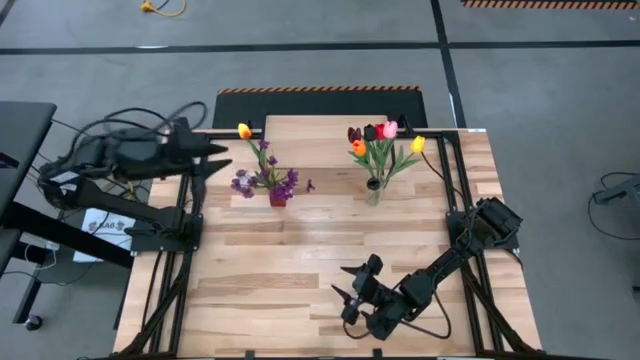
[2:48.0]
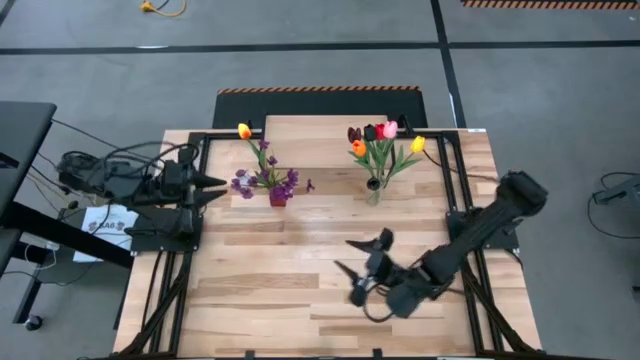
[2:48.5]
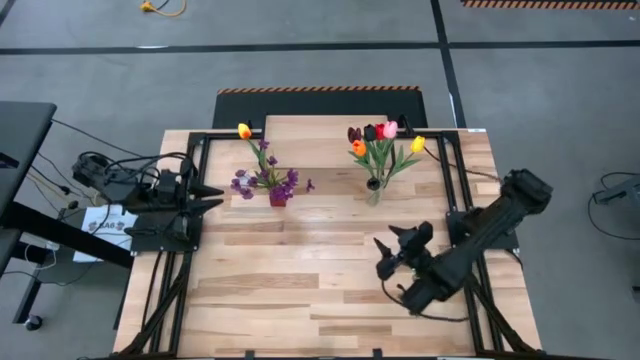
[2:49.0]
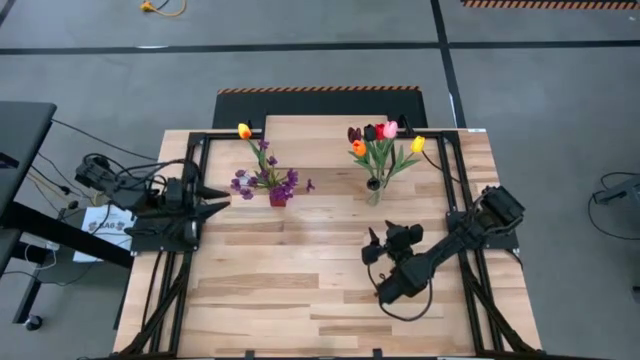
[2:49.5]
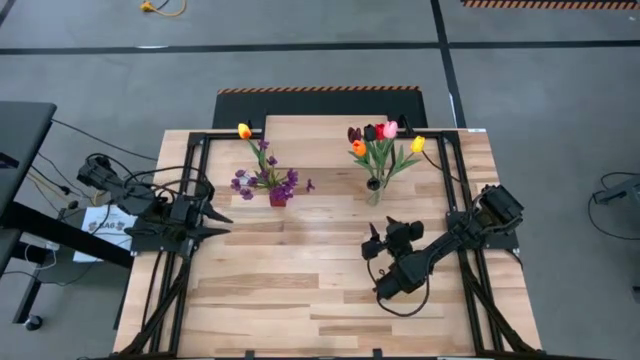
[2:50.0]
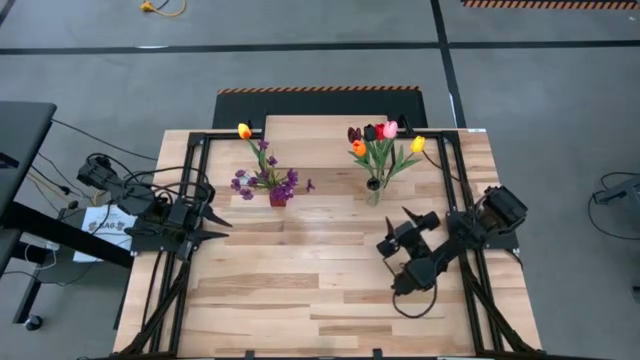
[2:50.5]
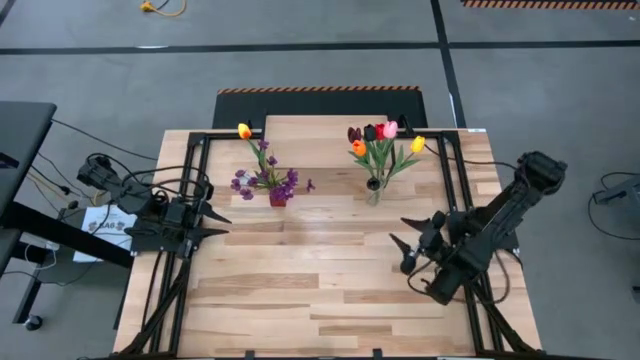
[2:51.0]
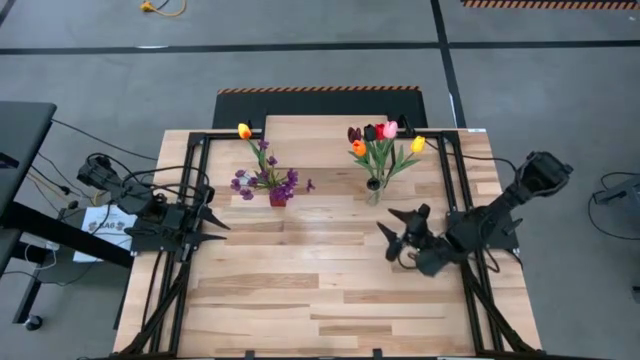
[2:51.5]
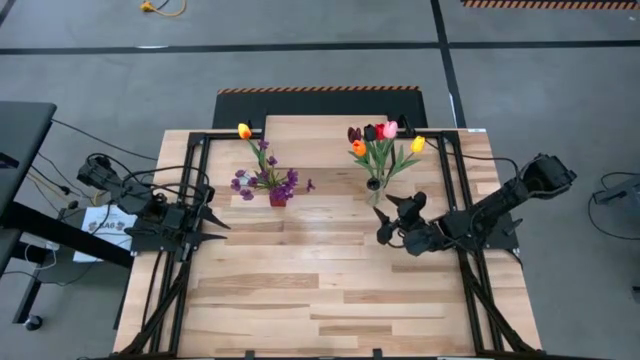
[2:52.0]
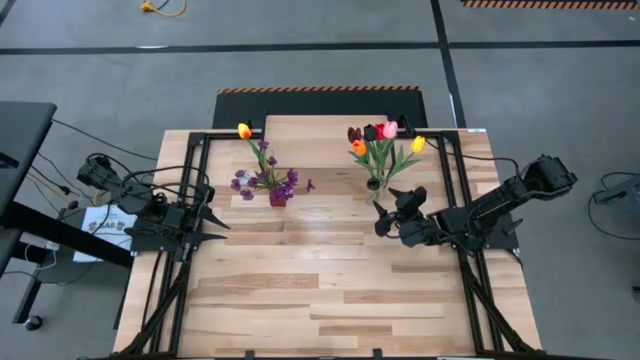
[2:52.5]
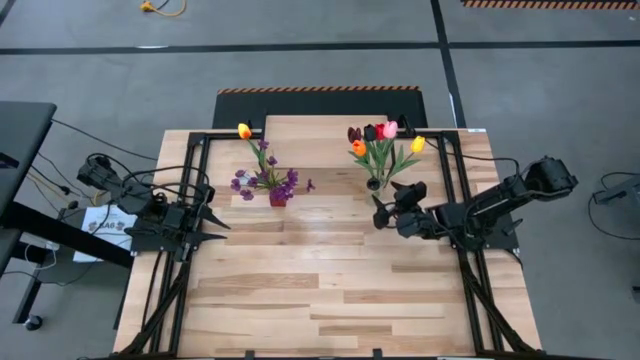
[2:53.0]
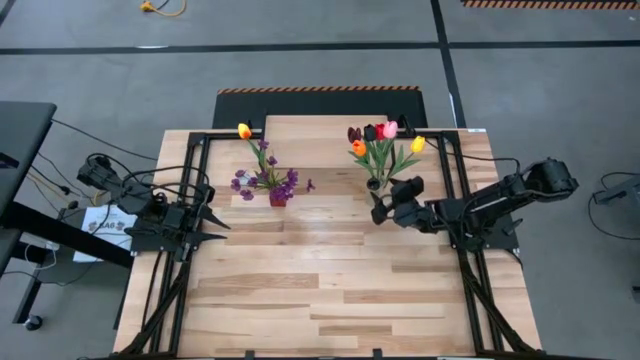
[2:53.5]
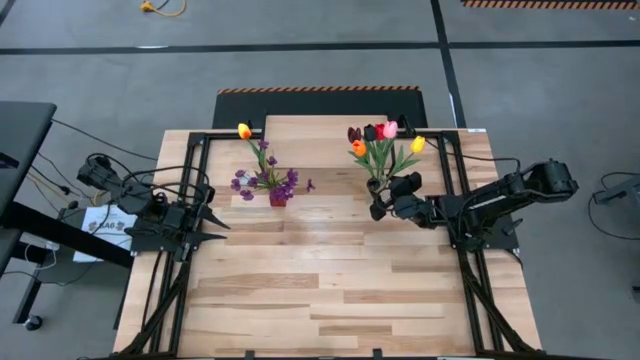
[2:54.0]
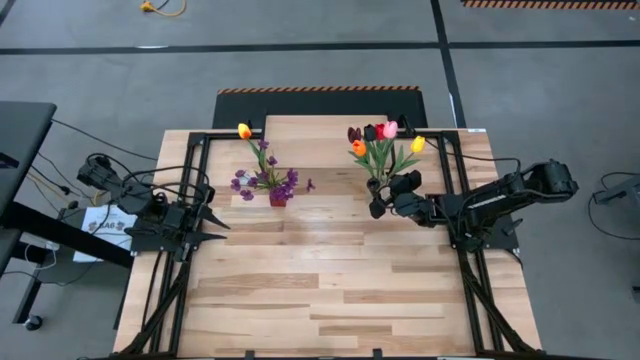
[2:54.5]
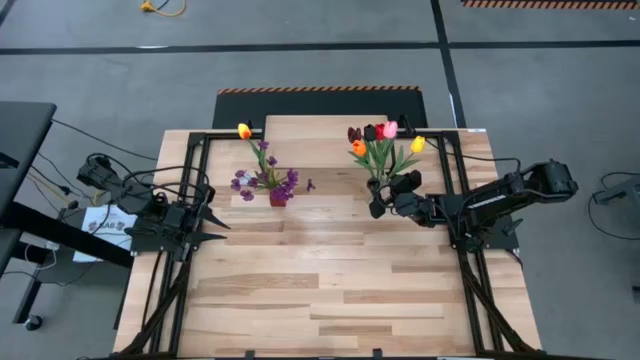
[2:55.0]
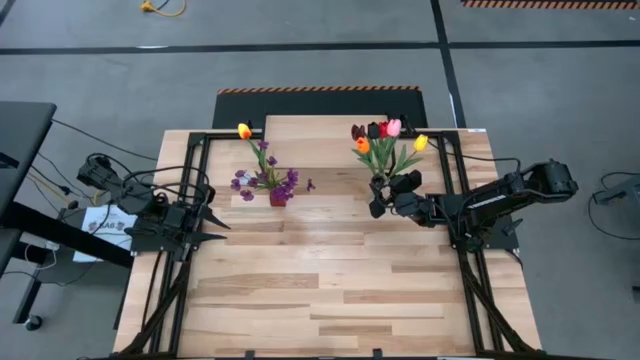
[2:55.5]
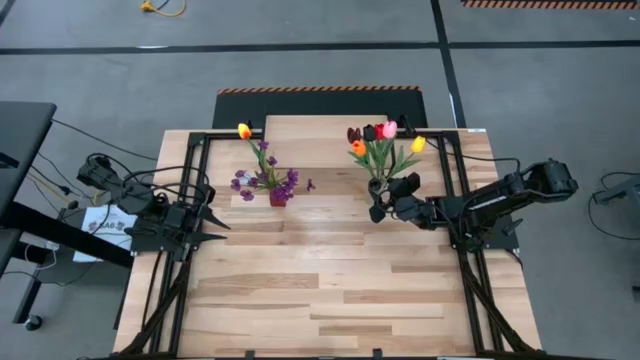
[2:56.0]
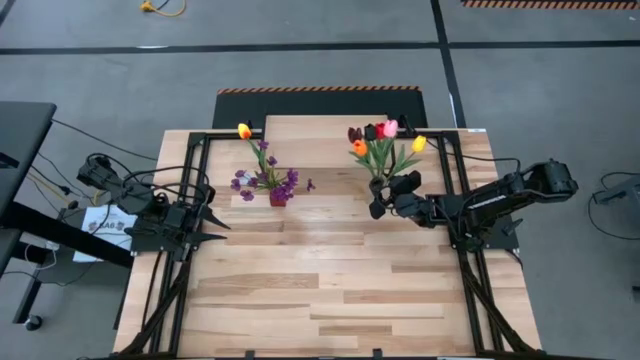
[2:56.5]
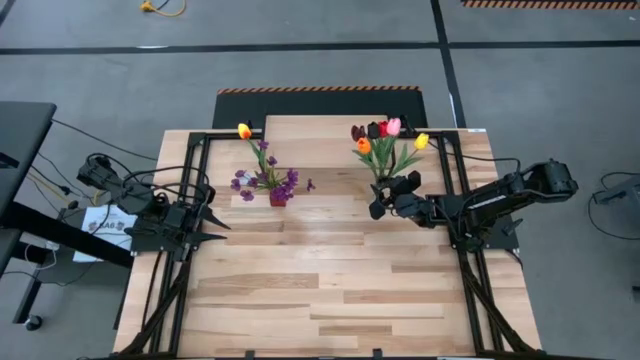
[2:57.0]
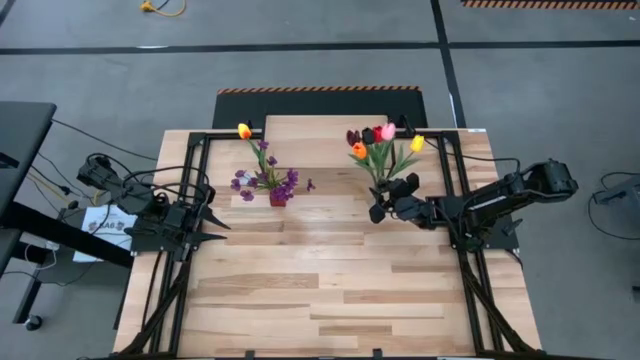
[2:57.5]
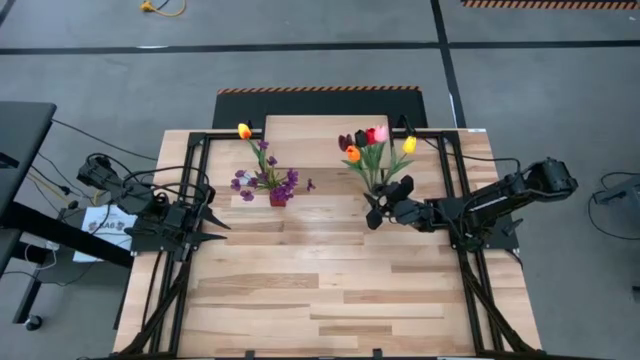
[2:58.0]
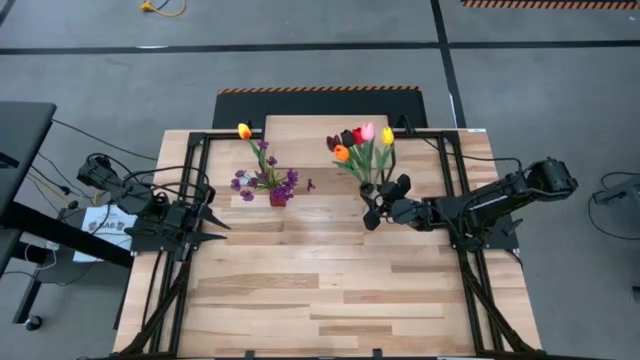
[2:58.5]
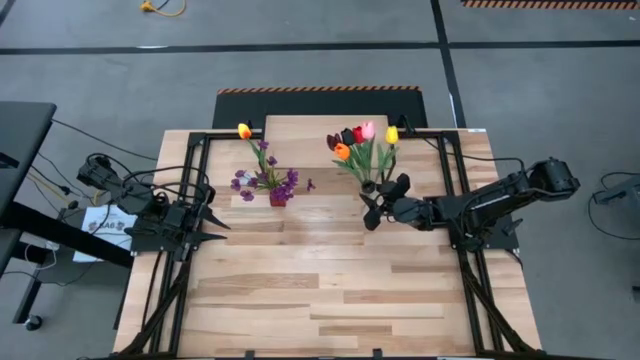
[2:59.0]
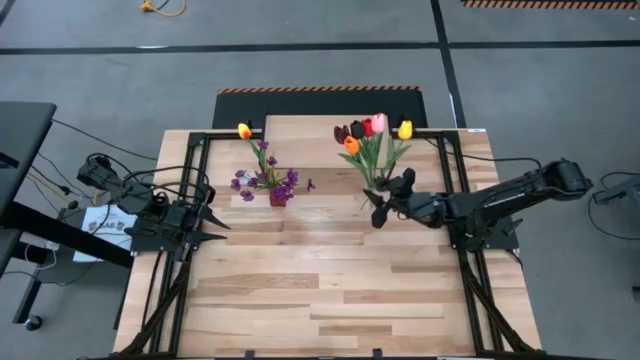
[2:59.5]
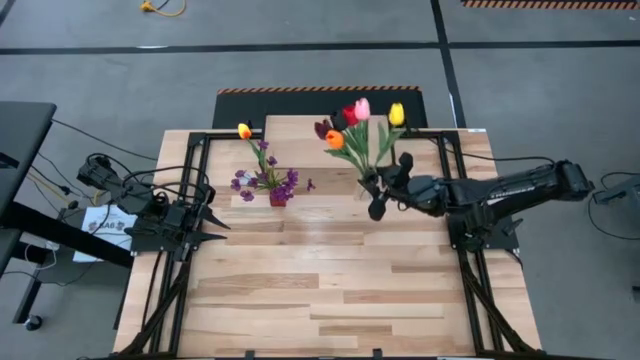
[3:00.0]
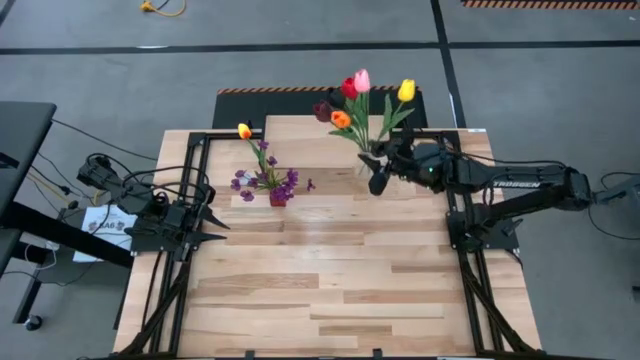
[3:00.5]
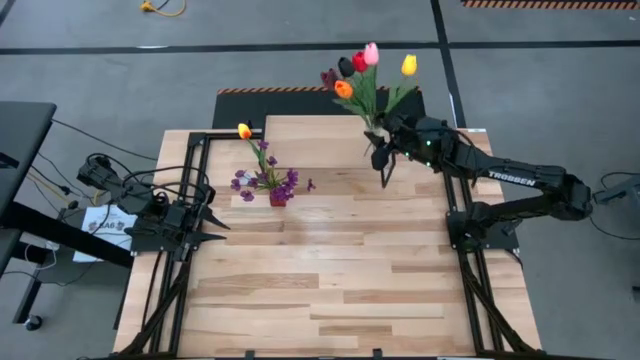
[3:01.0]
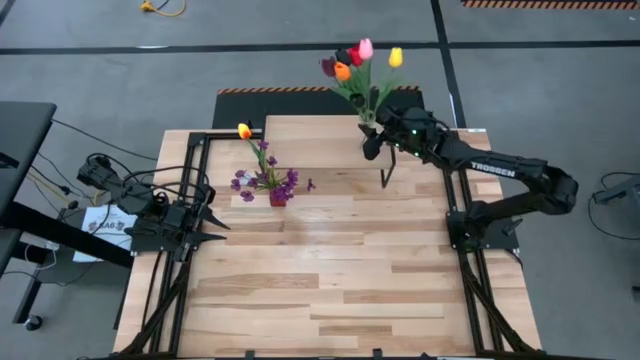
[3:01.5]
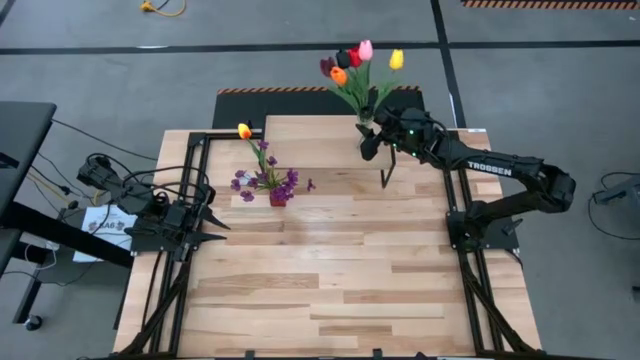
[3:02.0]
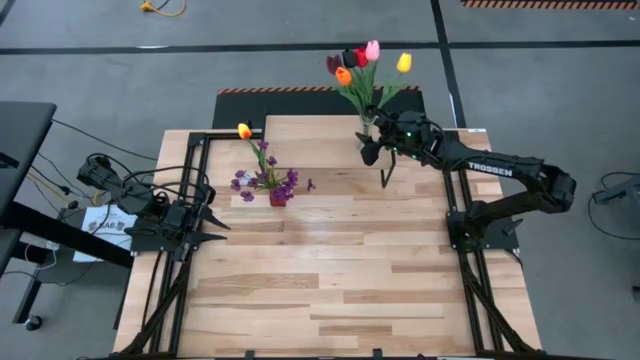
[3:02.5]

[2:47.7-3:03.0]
Task: Pick and place flowers into a vace then onto a shelf
Put the transparent vase filled with flowers on the shelf

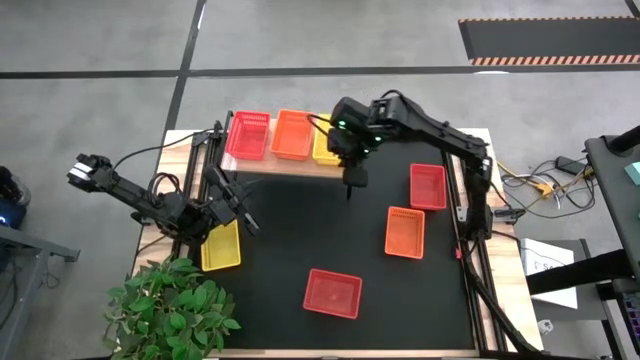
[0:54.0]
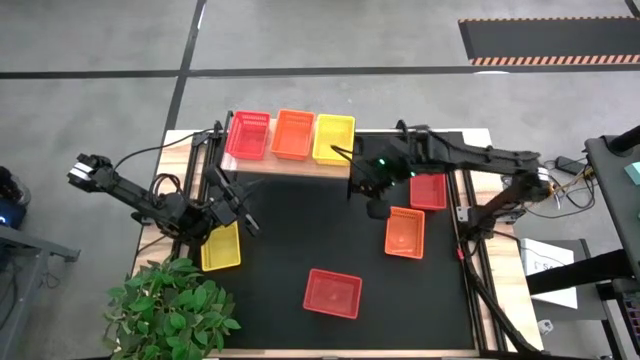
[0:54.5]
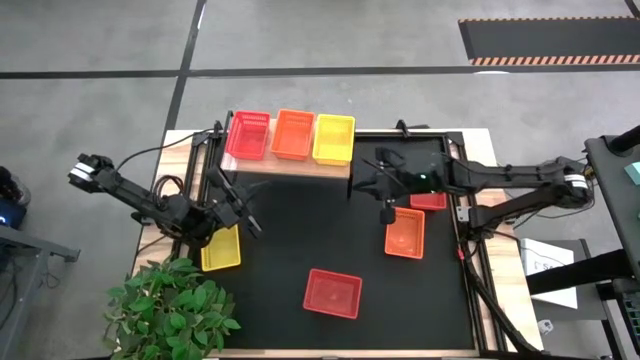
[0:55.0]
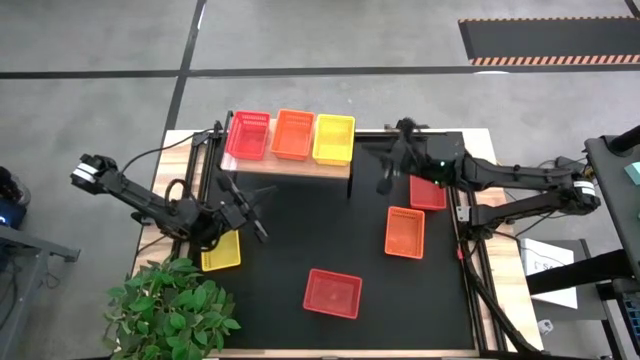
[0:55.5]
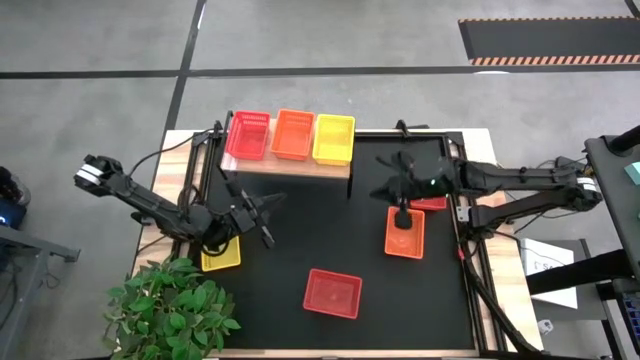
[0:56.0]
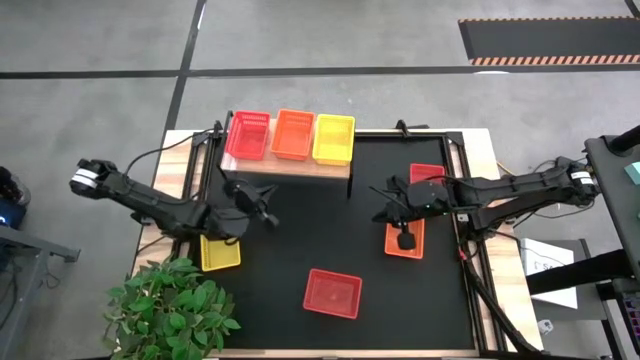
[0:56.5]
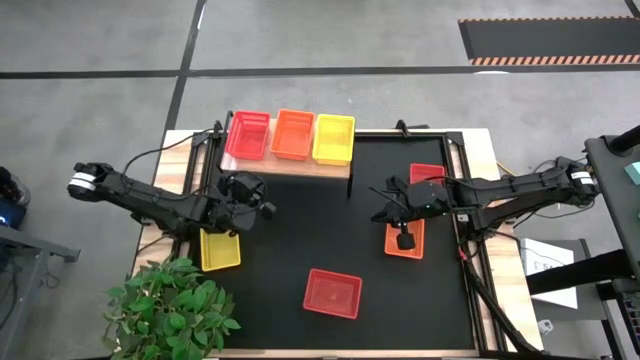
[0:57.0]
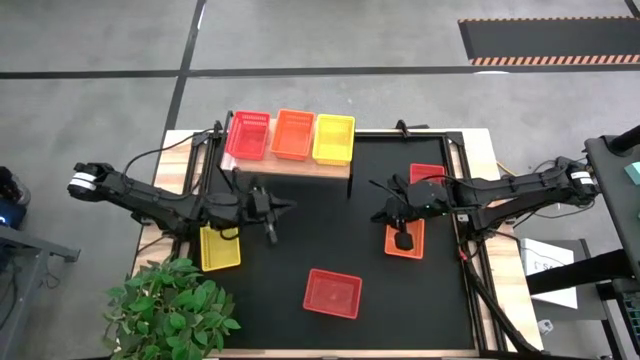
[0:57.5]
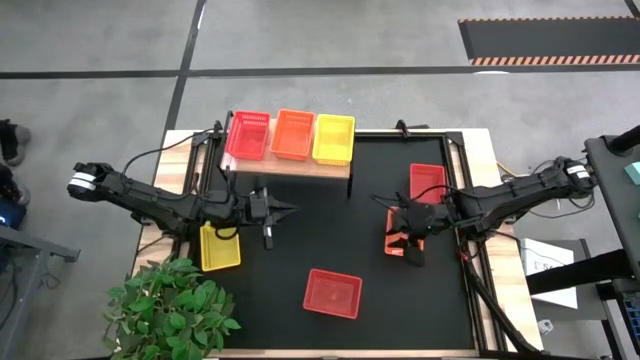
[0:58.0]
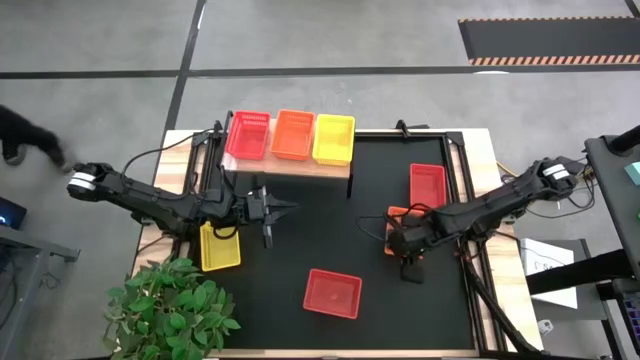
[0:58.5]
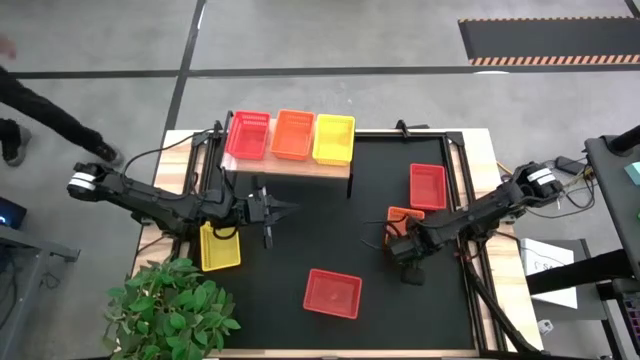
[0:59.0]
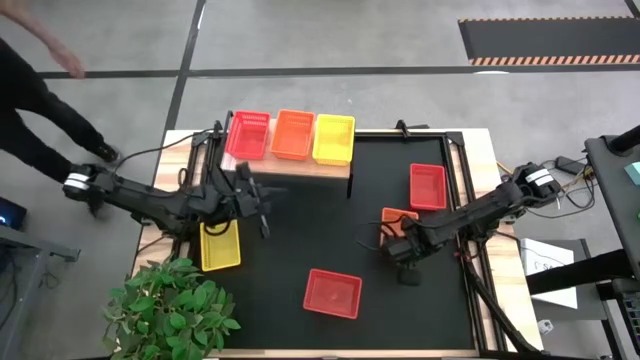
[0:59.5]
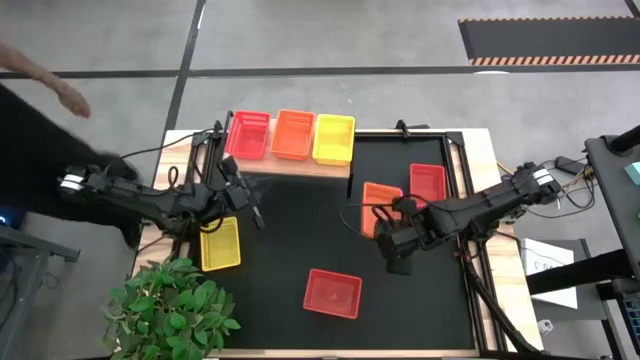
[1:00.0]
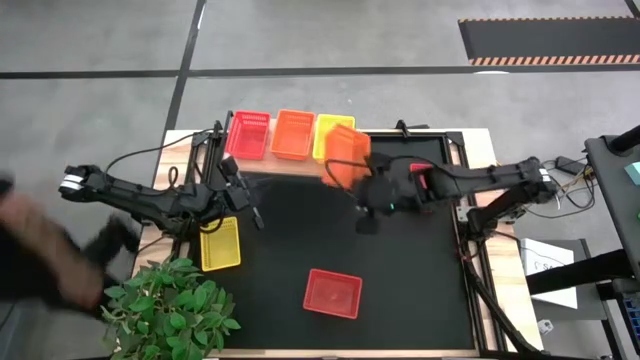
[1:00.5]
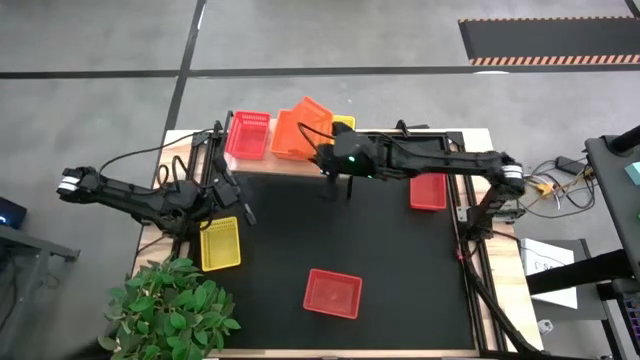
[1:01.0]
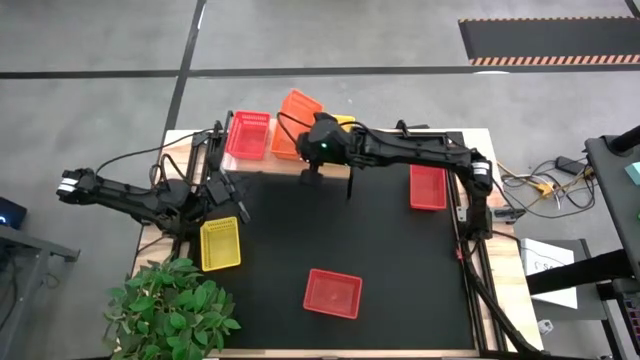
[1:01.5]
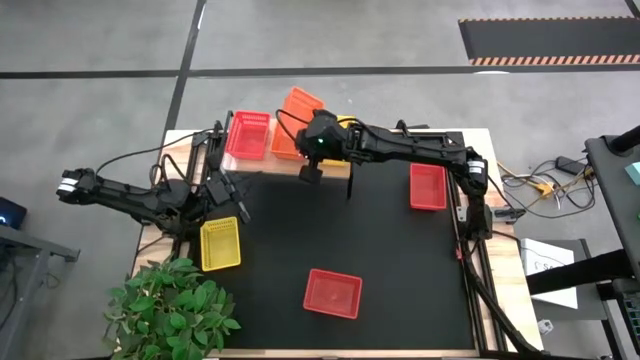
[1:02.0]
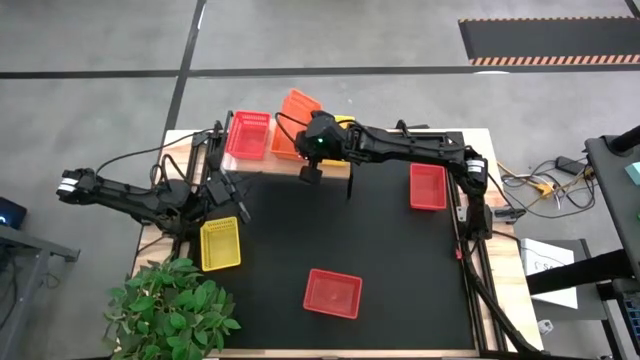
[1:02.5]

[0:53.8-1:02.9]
Task: Stack baskets on shelf by color
Stack the orange bin on the other orange bin on the shelf
